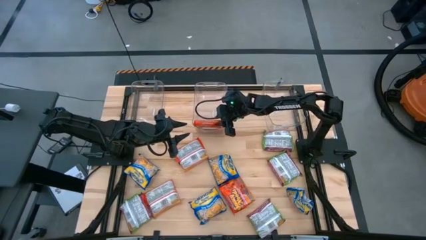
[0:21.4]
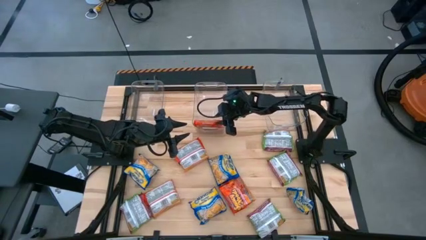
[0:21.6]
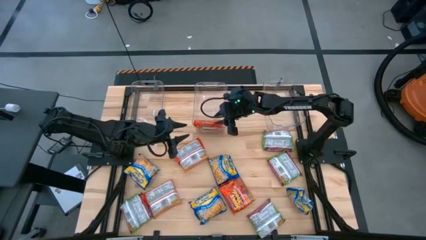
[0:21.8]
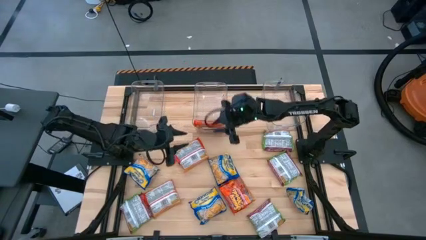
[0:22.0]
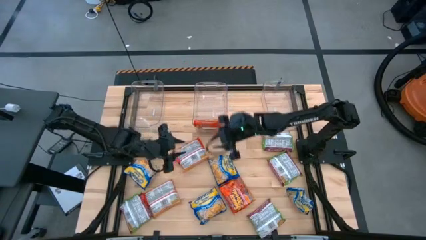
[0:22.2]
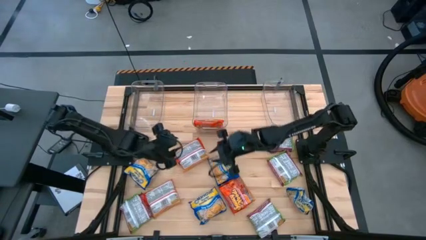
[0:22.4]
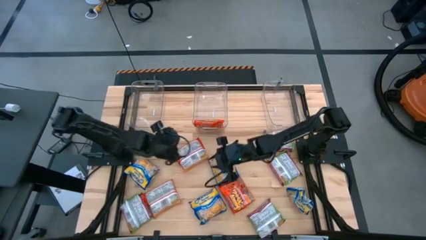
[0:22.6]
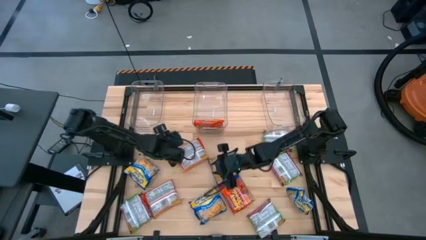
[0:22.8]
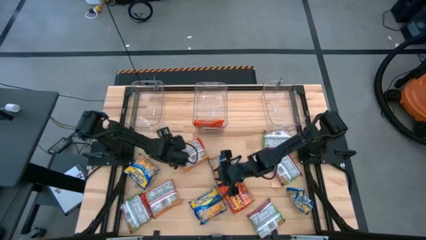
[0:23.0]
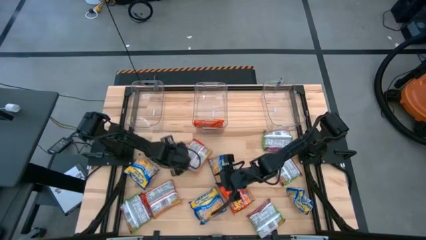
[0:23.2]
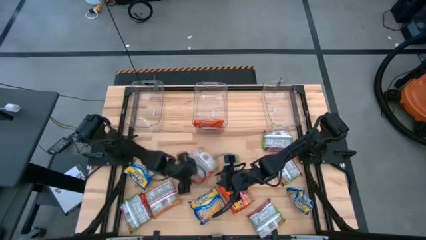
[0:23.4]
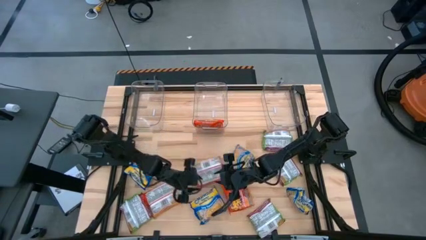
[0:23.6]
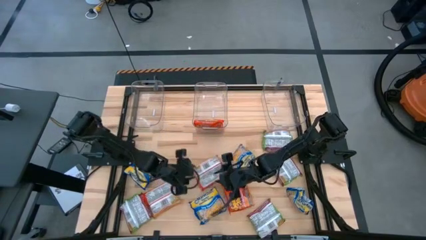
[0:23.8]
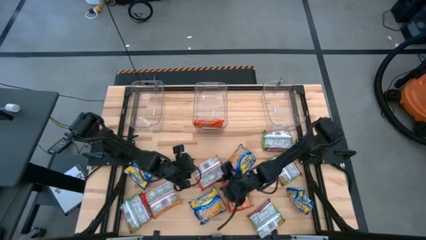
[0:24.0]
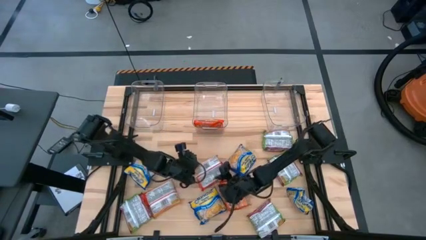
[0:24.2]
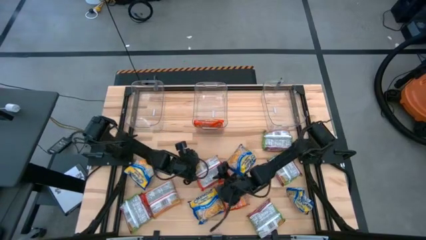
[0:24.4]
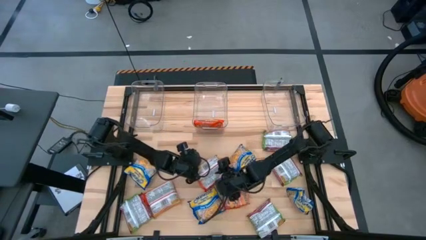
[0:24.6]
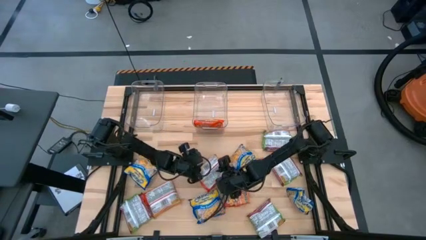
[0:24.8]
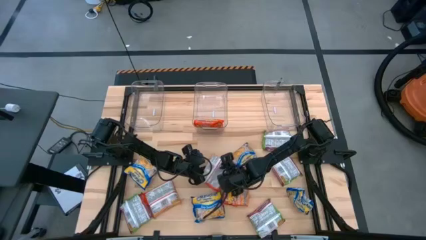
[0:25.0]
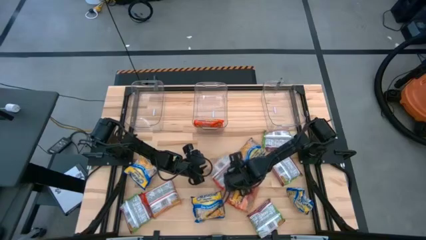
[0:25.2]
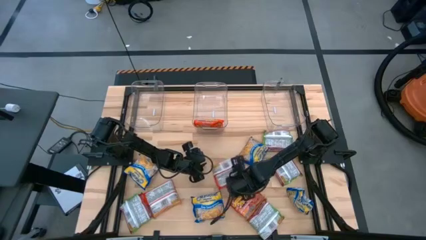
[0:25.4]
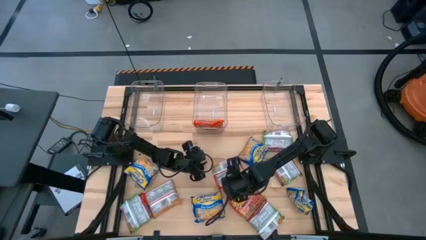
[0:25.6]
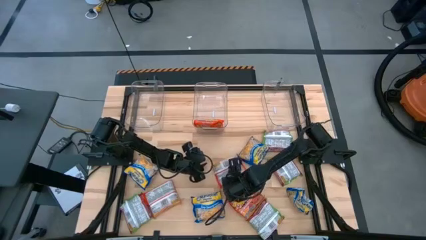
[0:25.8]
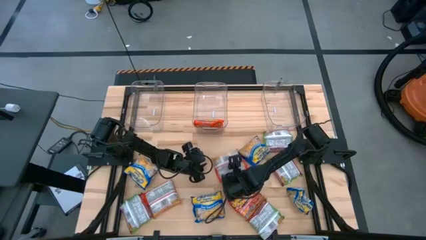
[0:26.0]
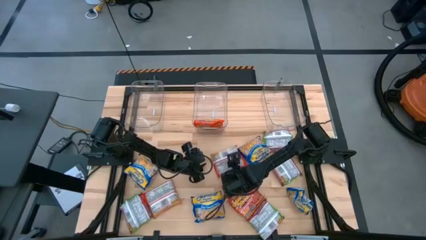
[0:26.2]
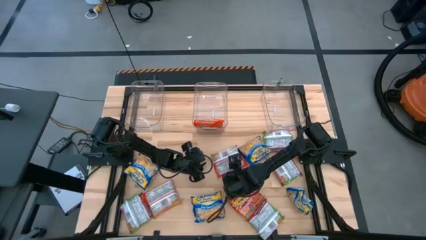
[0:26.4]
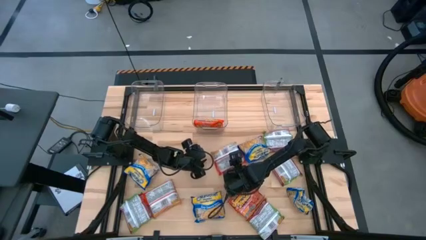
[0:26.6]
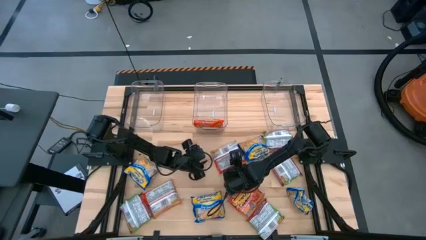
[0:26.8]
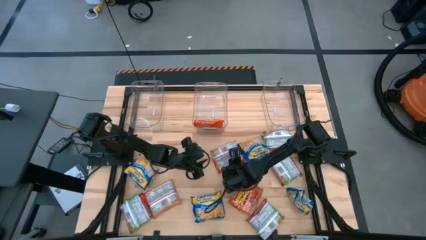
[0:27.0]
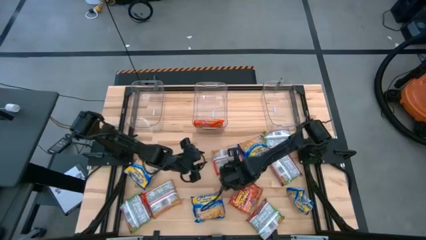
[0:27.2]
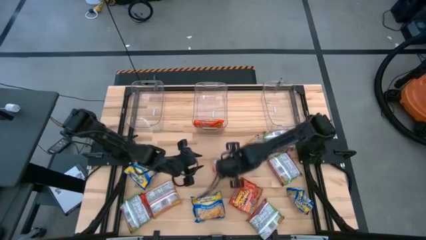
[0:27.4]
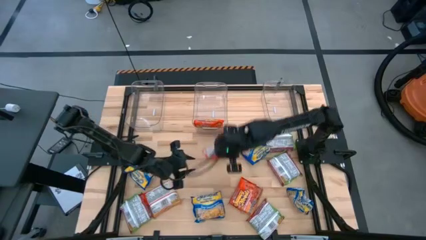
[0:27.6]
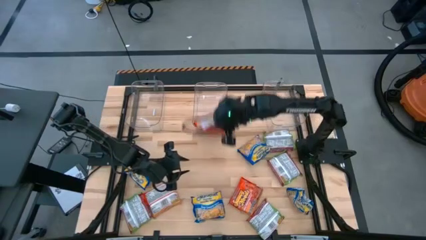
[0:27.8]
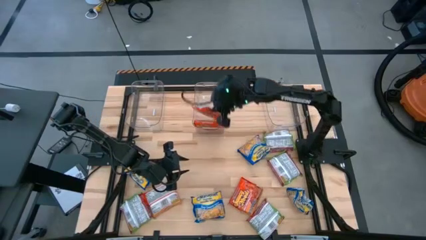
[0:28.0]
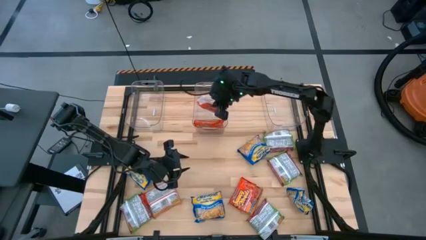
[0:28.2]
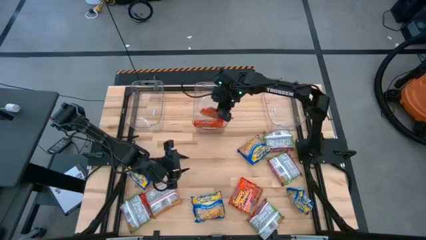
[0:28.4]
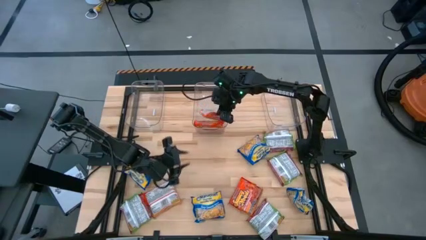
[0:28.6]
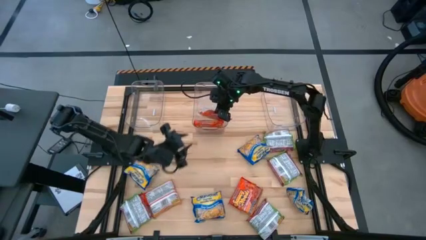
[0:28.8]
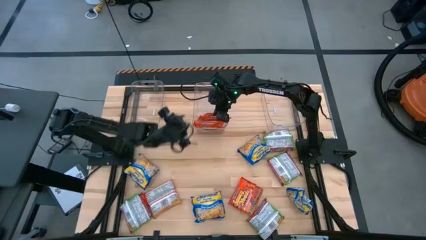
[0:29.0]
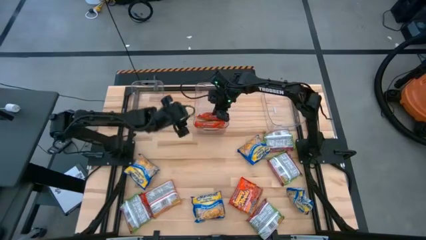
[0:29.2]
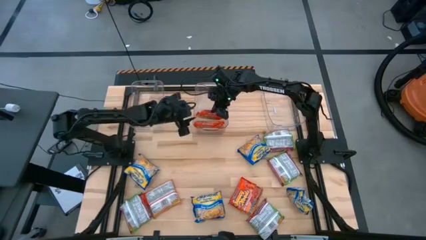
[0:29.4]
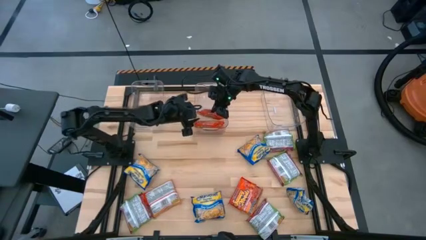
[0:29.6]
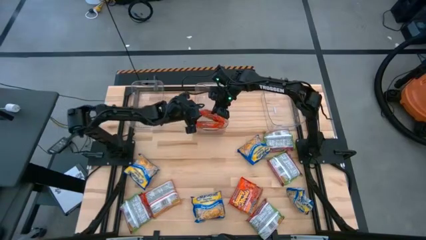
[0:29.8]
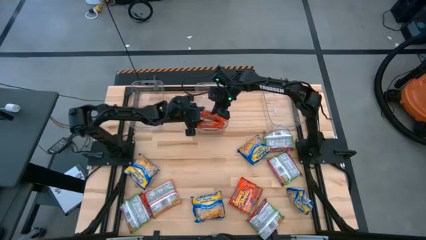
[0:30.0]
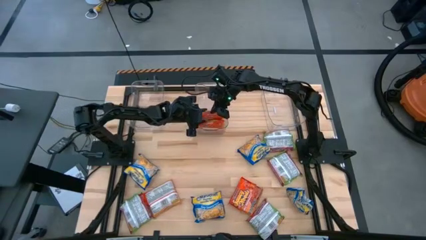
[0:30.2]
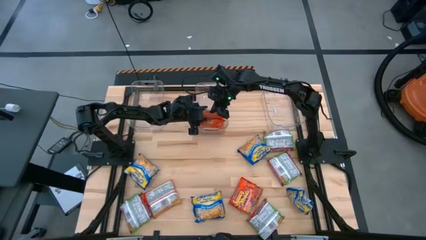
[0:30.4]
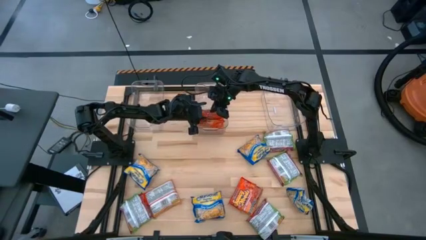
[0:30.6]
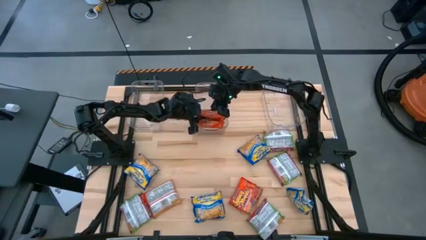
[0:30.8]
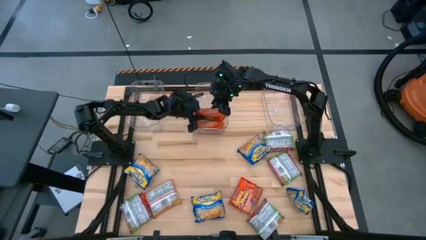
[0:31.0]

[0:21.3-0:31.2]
Task: Sort Maruchan noodles
Put the orange noodle pack into the middle transparent bin

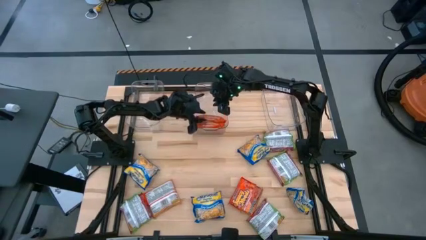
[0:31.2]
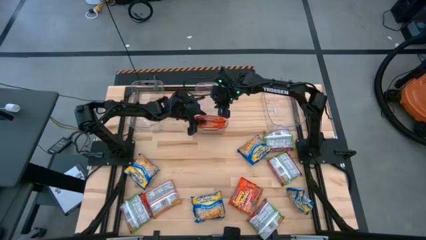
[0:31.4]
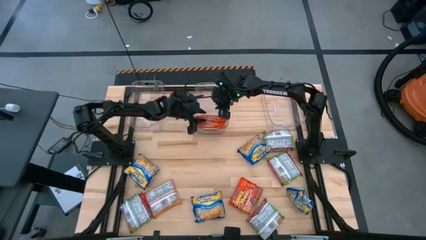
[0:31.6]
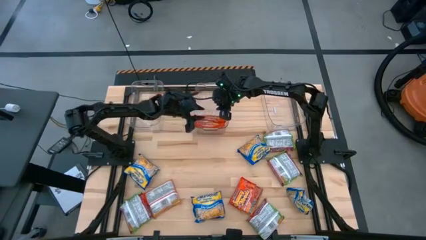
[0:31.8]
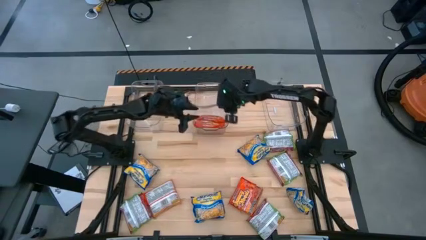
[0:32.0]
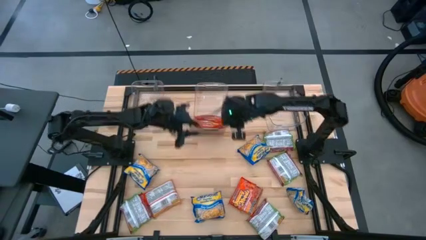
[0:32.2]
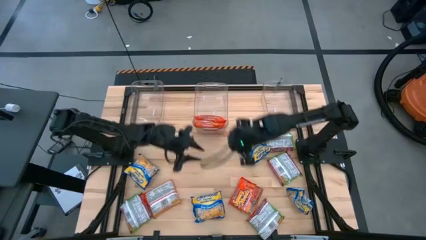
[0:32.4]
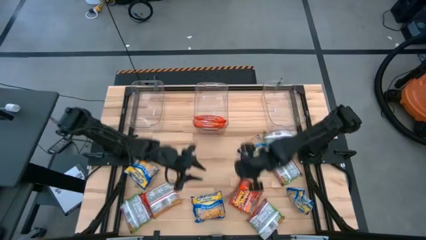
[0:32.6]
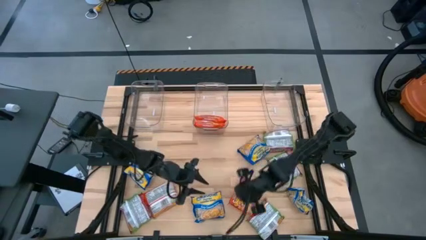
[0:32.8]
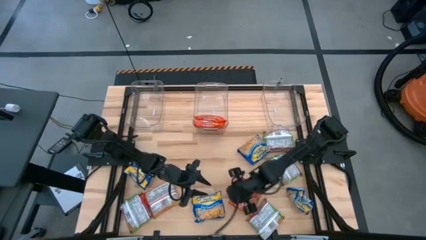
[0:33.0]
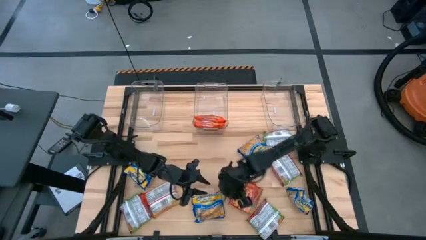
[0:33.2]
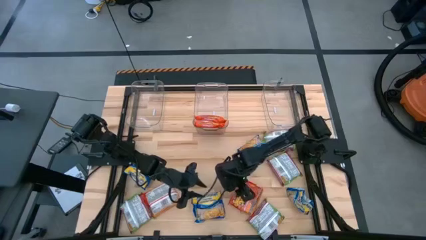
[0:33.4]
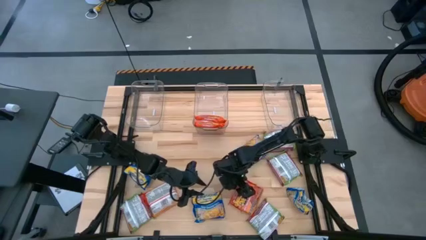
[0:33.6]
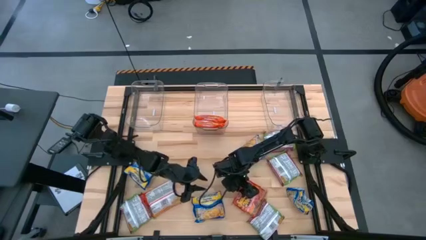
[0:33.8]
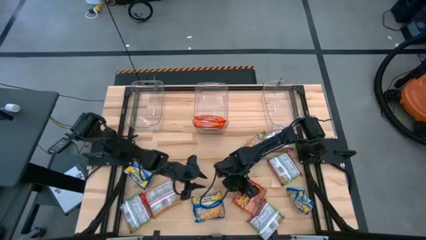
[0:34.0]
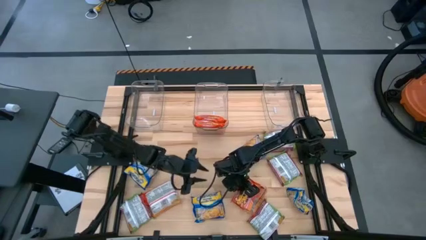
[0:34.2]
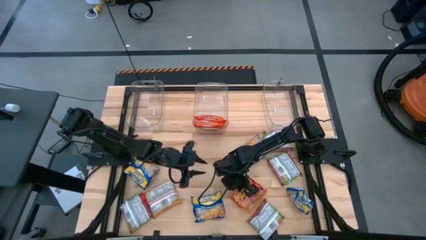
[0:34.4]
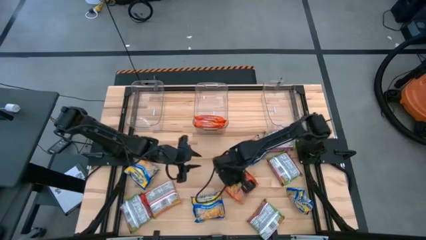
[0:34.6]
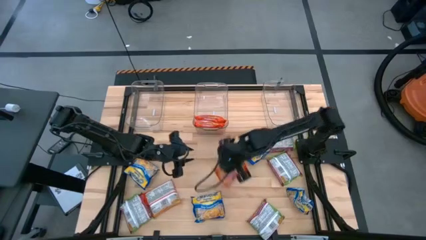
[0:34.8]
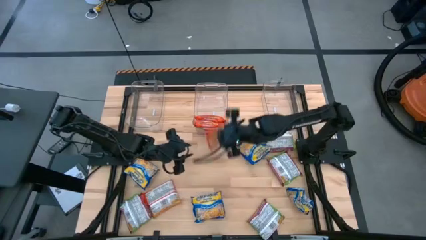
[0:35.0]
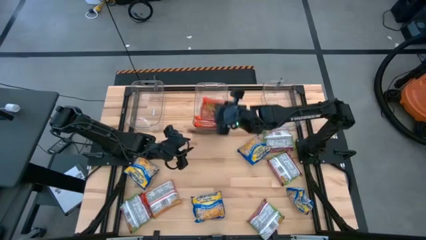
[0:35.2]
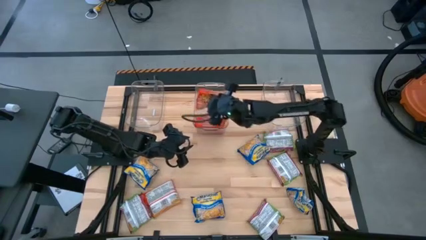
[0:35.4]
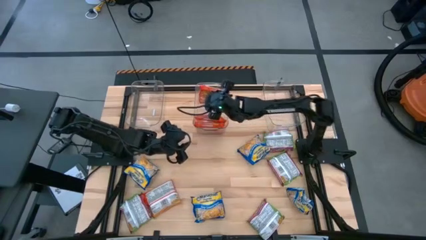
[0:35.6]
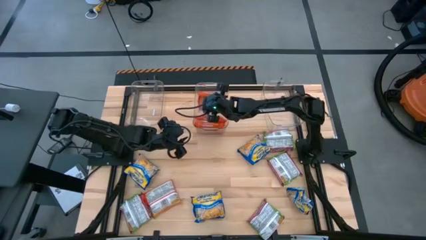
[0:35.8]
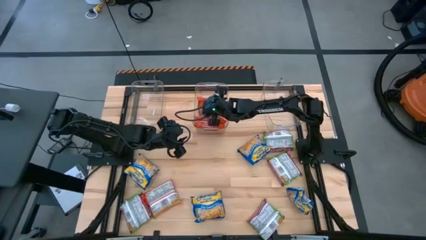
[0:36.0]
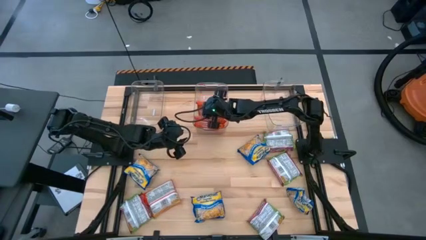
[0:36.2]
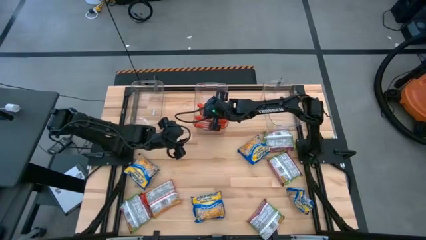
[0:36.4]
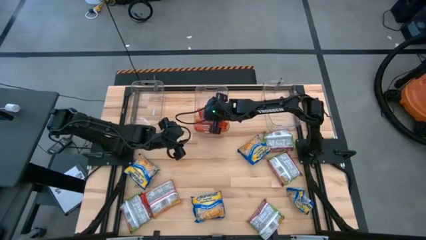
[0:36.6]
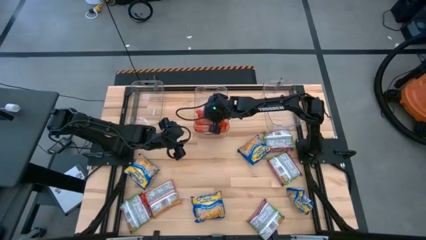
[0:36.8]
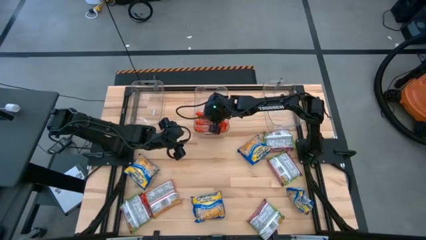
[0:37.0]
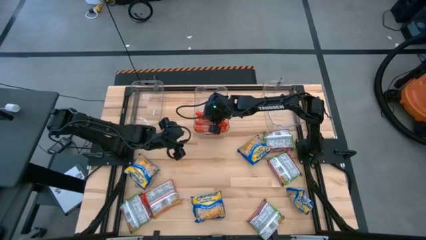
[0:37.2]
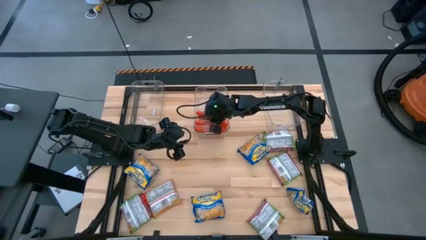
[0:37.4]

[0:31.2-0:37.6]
Put the orange noodle pack into the middle transparent bin
